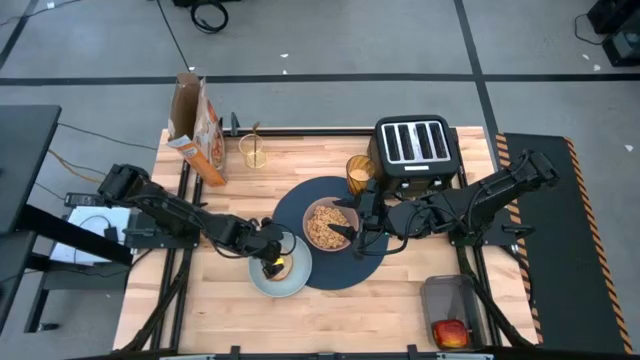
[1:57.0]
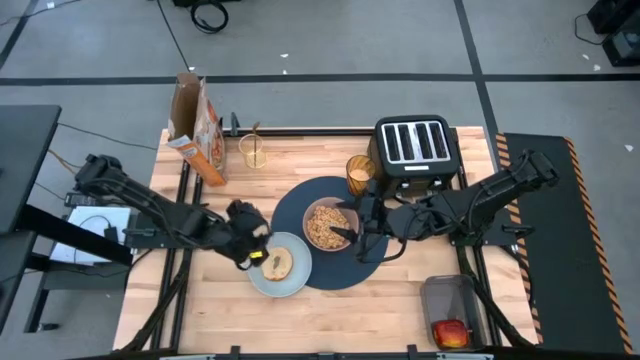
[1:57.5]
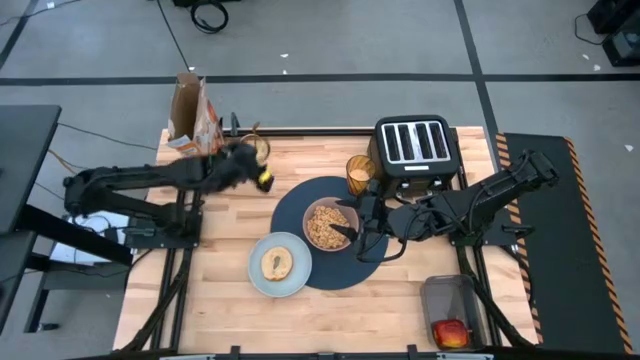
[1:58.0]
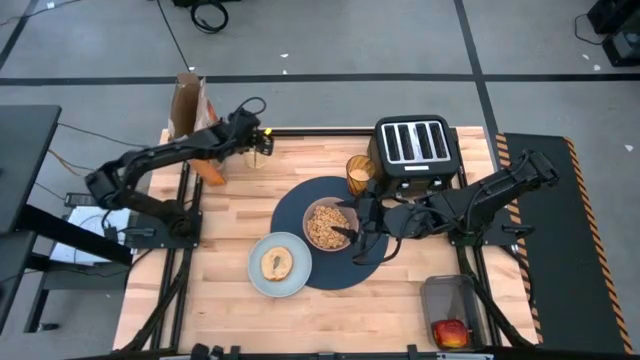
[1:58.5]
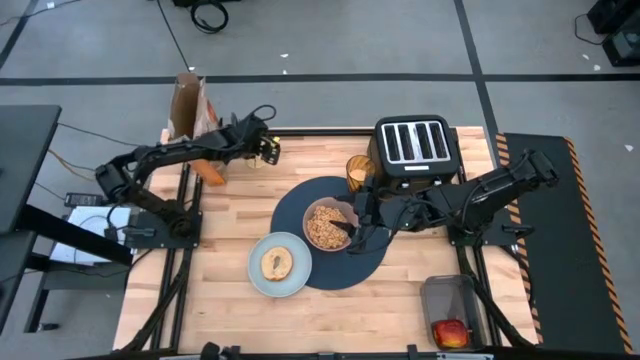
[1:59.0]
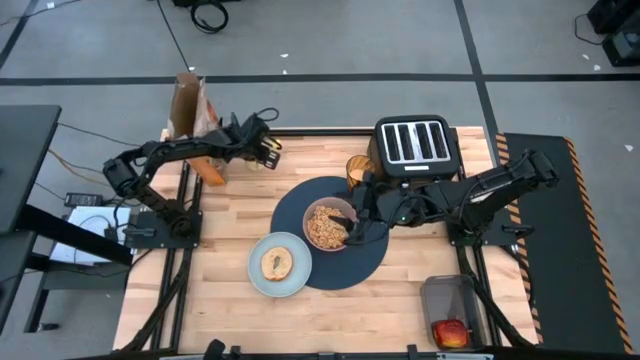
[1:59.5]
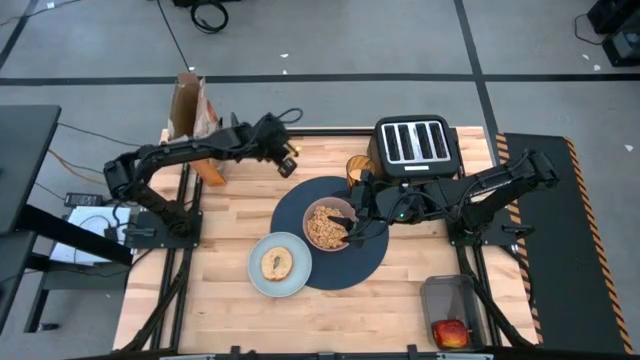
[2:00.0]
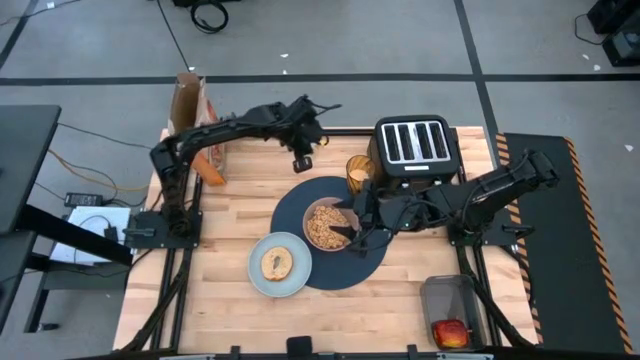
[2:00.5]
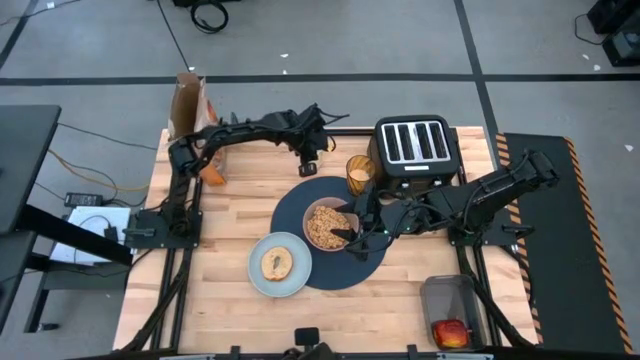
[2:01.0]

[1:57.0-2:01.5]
Task: Arrange a breakfast setting
Move the gold organizer on the top center of the table

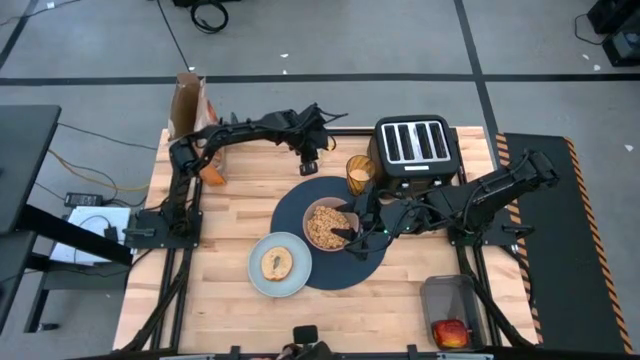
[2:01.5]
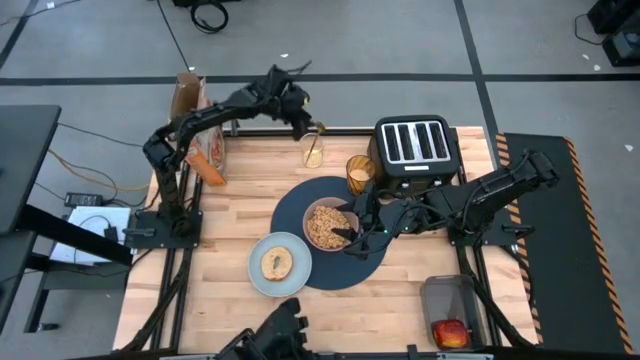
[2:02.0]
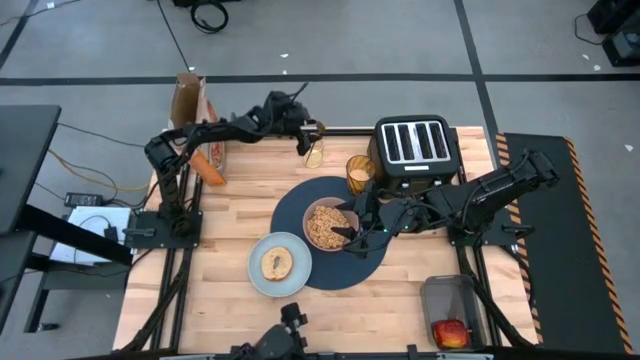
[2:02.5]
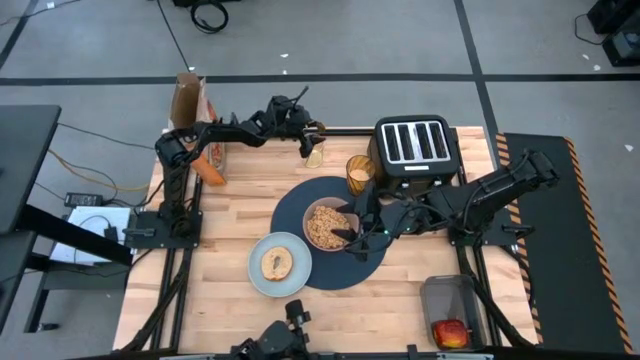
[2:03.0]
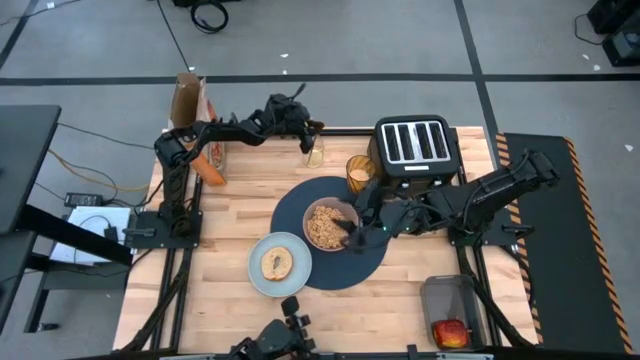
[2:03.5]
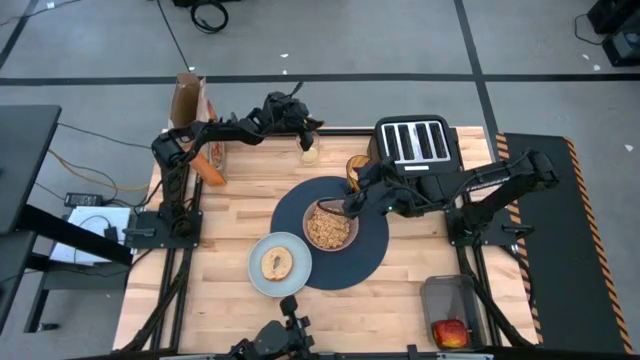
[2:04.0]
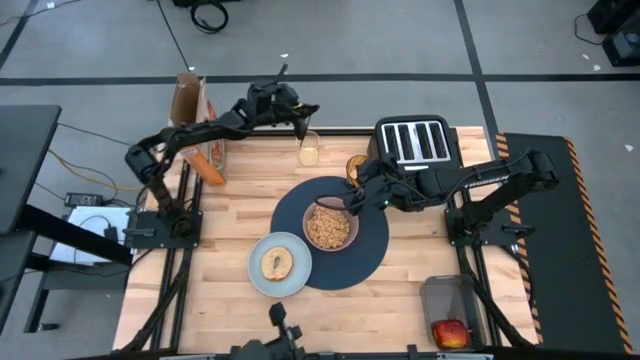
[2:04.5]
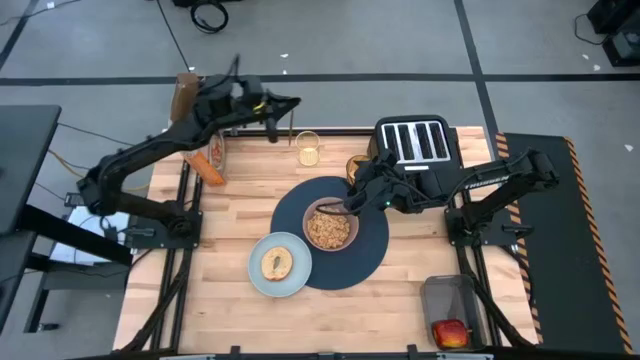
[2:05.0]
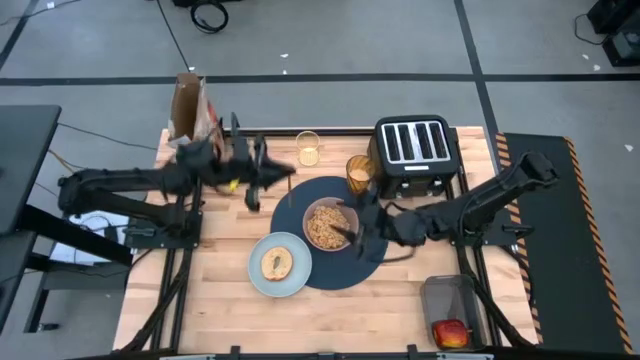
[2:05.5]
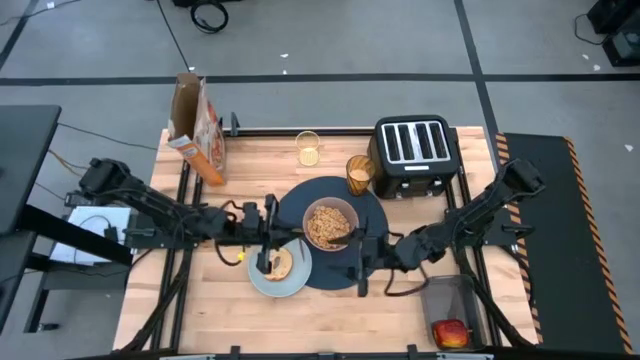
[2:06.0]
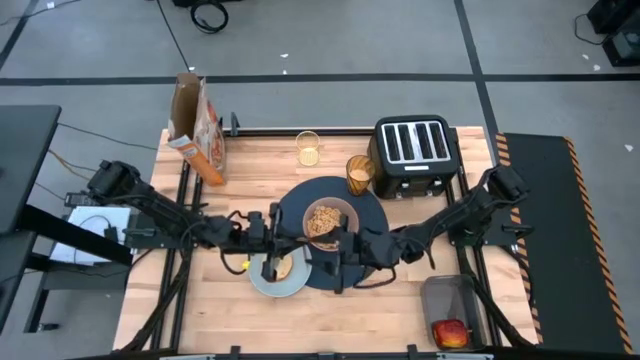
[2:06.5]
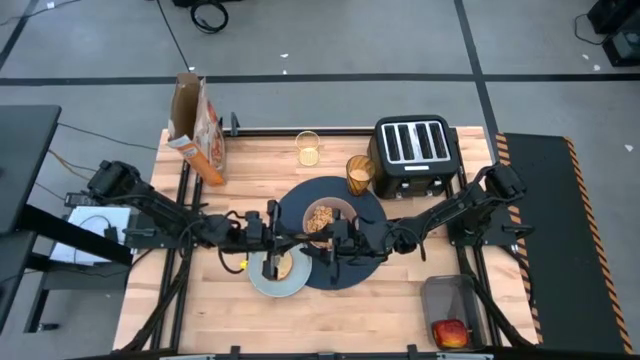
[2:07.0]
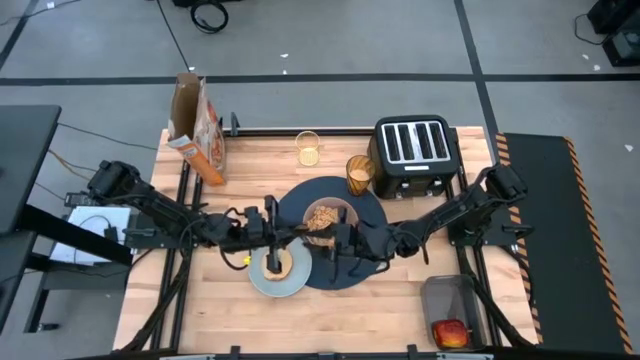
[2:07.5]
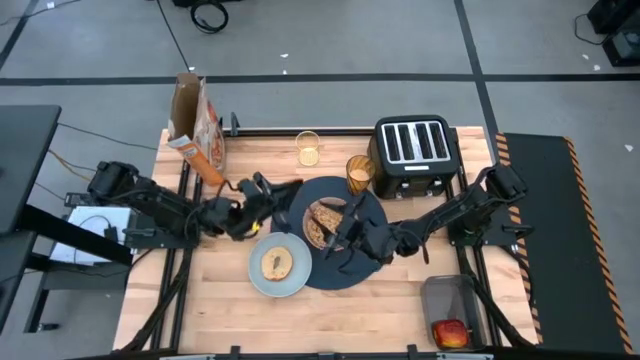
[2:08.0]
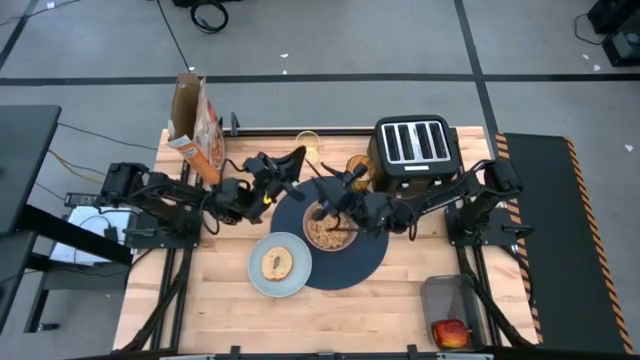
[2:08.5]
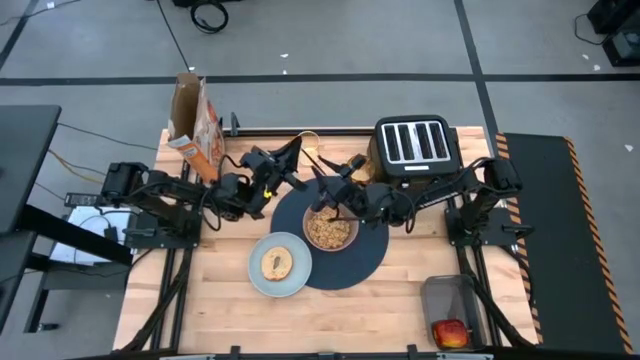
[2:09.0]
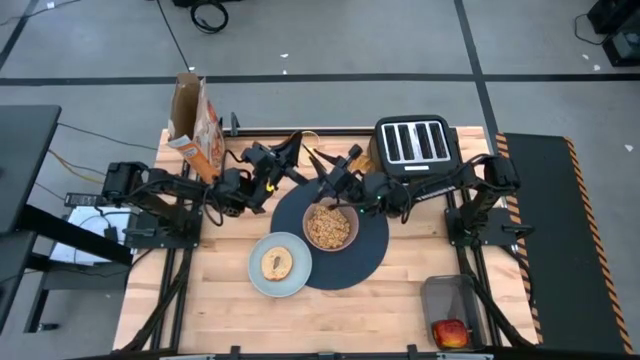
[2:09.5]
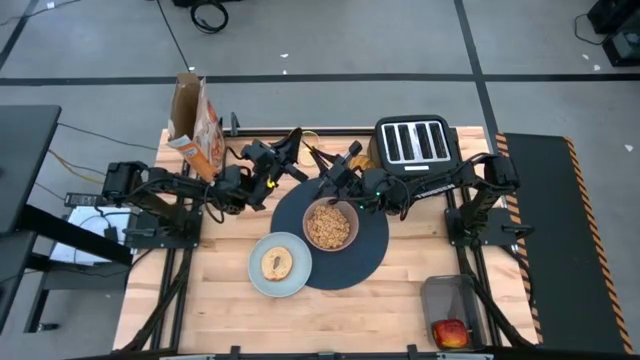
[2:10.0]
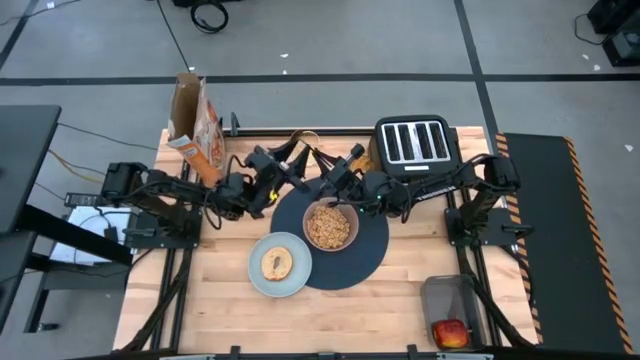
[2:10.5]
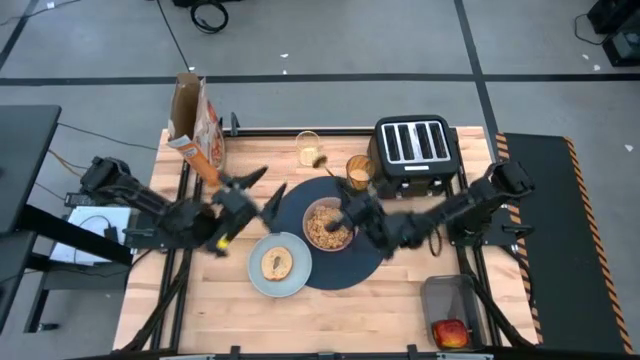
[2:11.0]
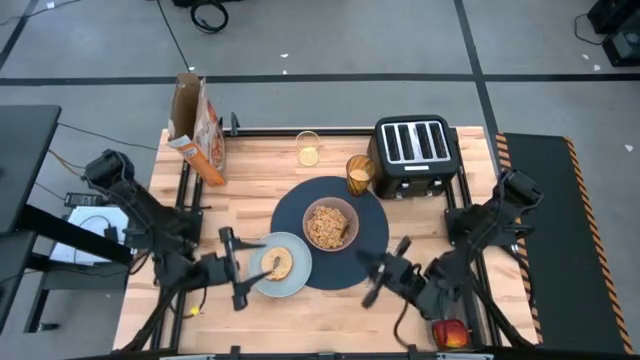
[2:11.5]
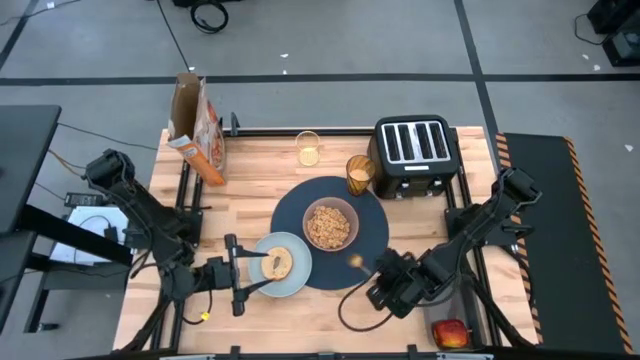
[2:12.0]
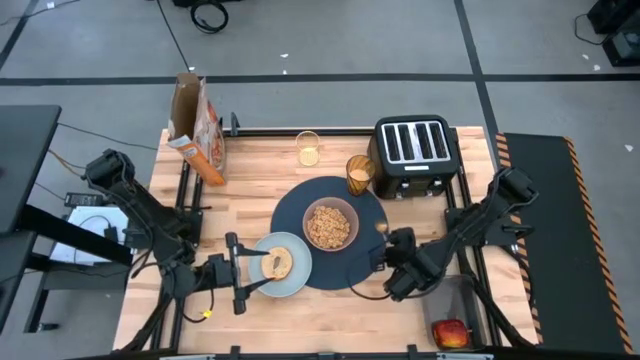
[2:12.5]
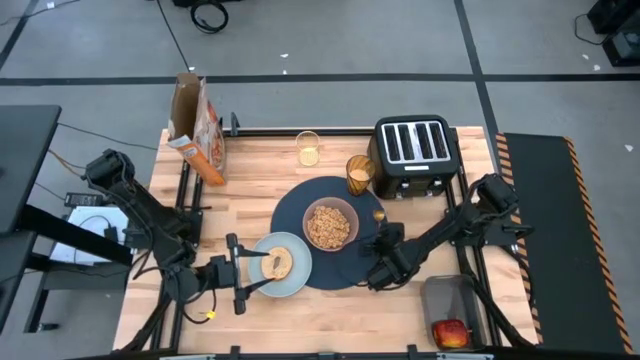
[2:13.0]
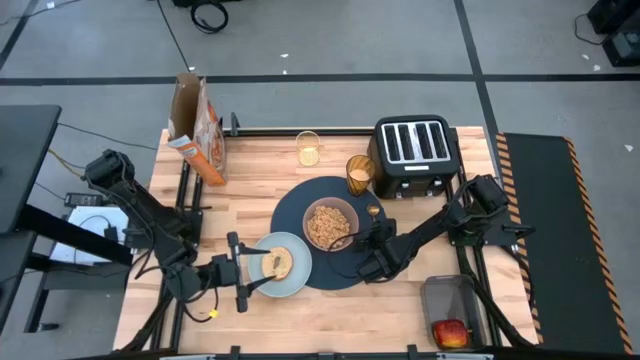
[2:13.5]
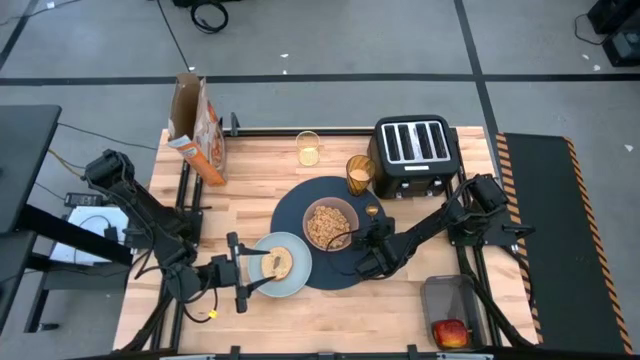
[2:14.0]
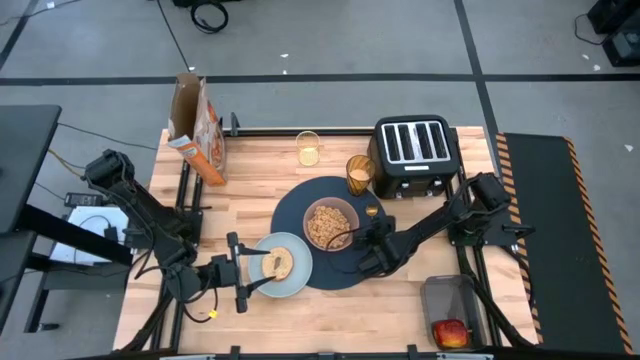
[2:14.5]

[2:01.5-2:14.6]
Put the gold spoon on the right side of the light orange bowl on the blue table placemat

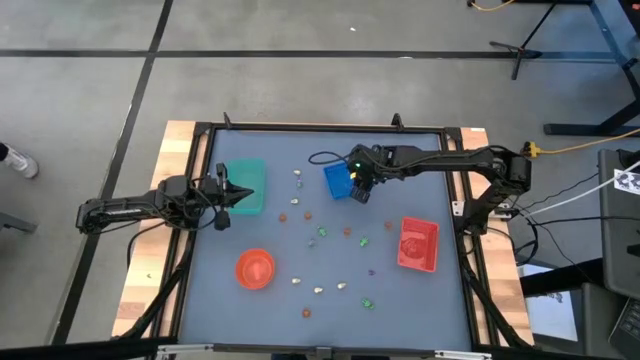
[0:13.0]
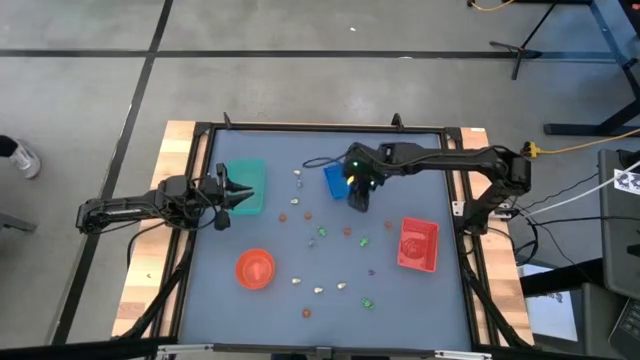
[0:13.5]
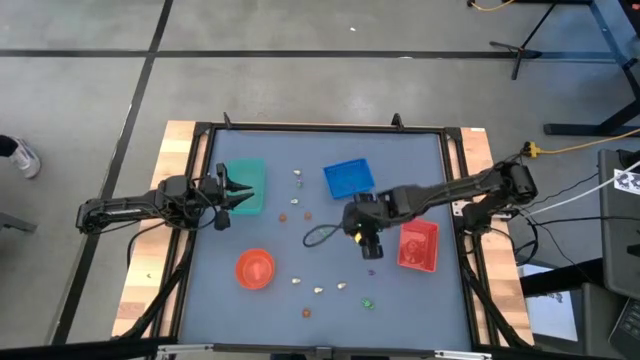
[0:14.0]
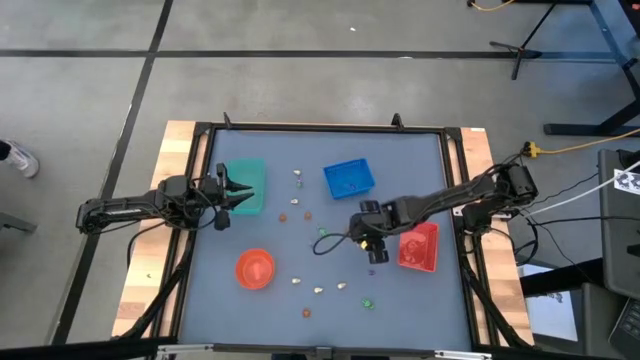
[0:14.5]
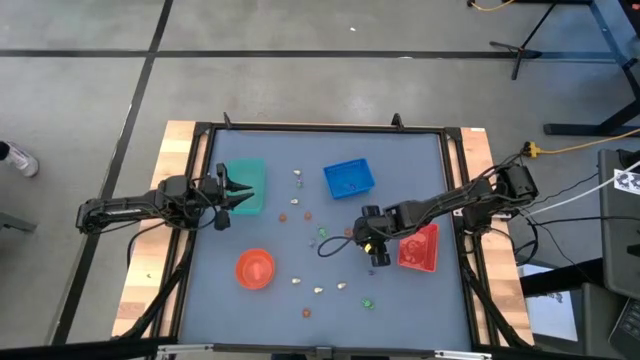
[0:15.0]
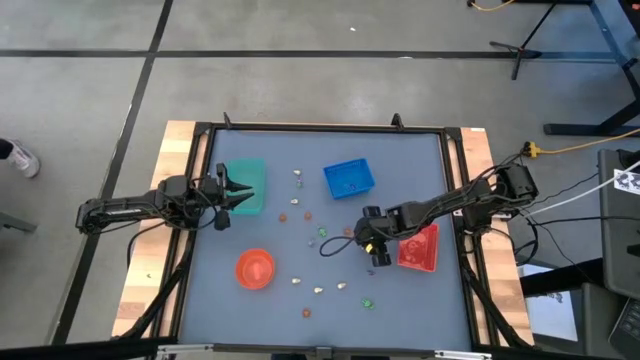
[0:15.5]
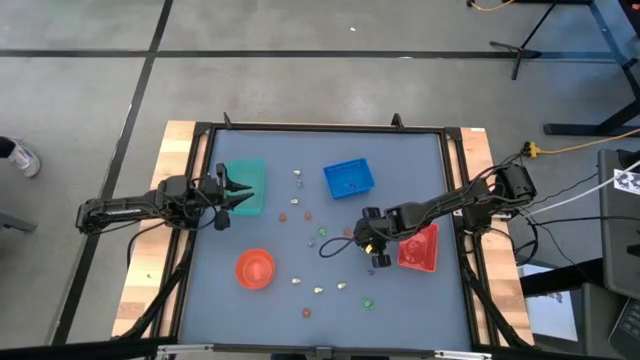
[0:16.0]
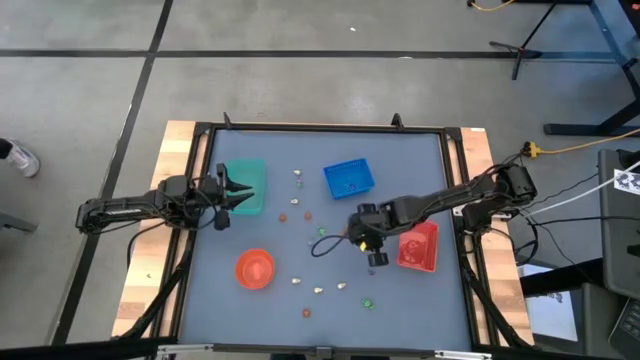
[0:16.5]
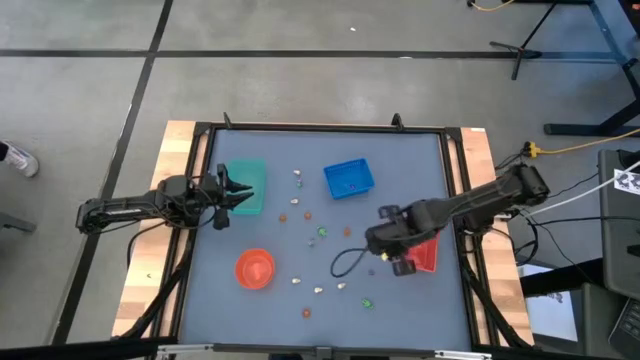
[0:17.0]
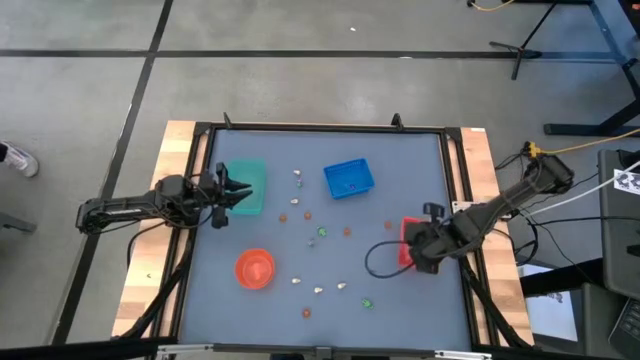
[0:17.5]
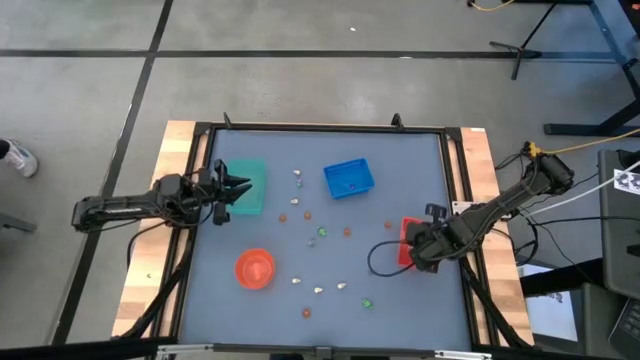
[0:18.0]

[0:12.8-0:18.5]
Task: Sort Halloween decoration
Put the green skeleton toy into the orange bin
